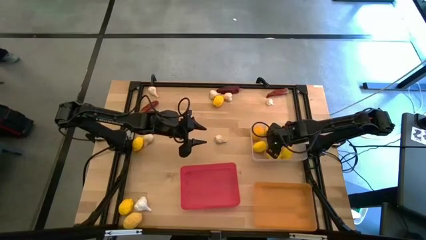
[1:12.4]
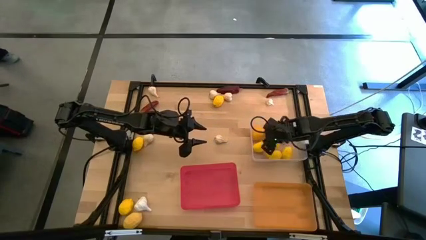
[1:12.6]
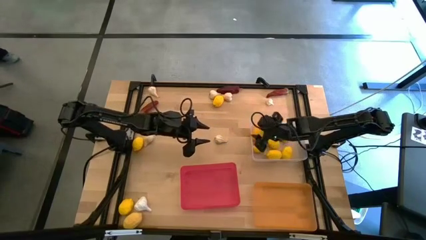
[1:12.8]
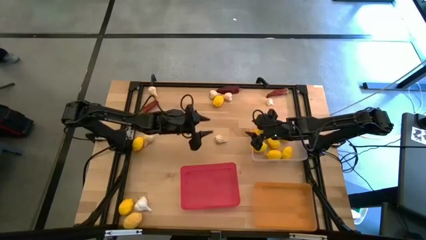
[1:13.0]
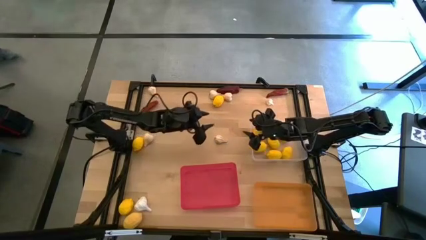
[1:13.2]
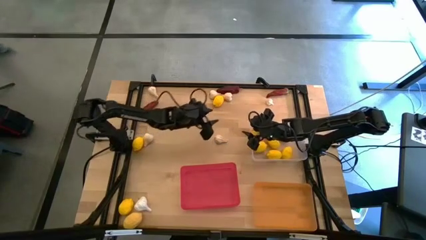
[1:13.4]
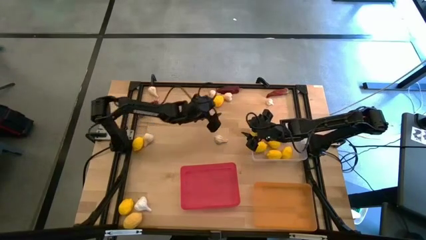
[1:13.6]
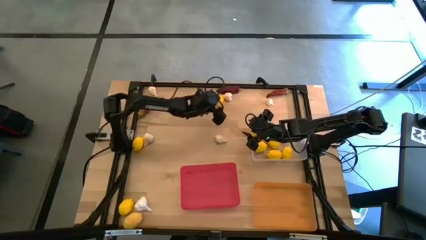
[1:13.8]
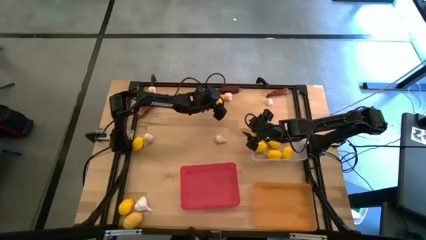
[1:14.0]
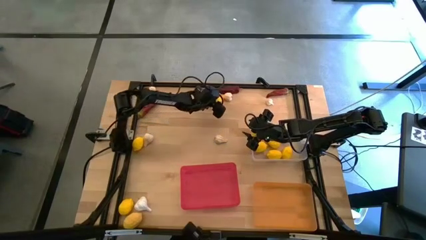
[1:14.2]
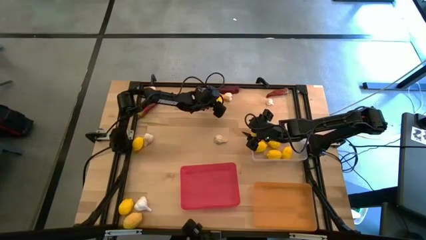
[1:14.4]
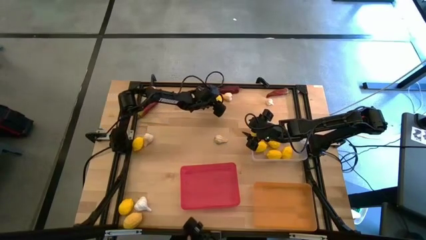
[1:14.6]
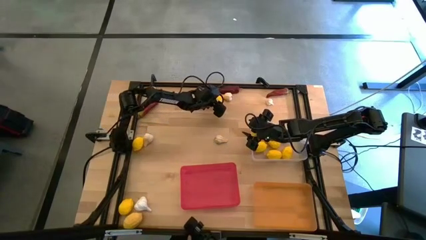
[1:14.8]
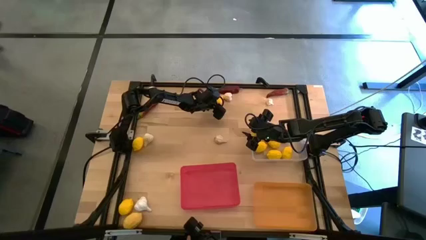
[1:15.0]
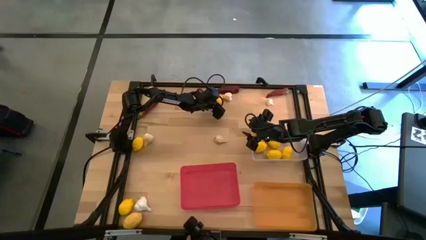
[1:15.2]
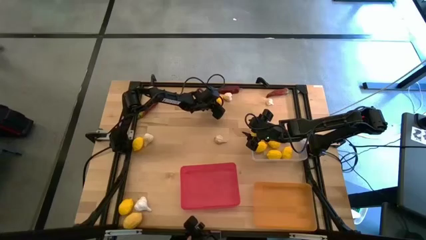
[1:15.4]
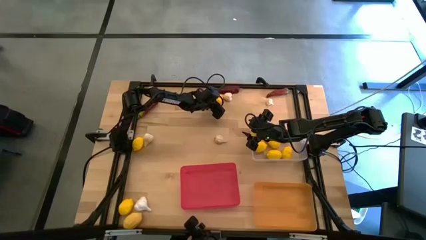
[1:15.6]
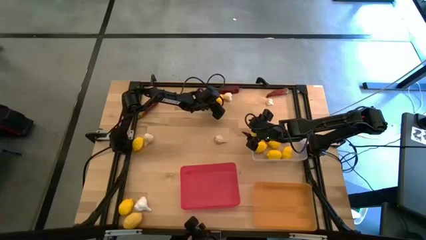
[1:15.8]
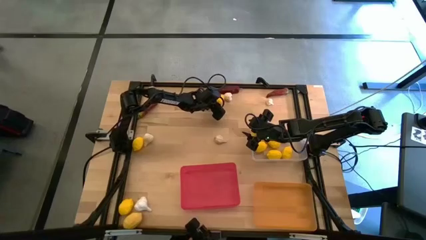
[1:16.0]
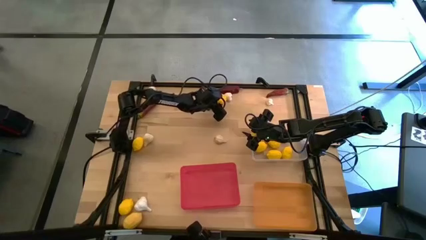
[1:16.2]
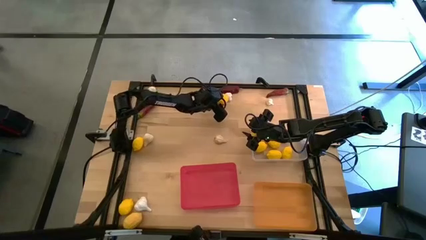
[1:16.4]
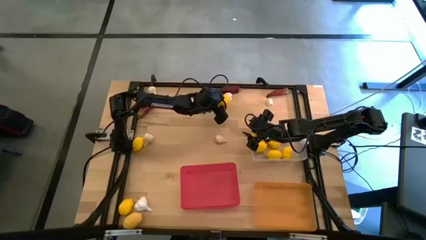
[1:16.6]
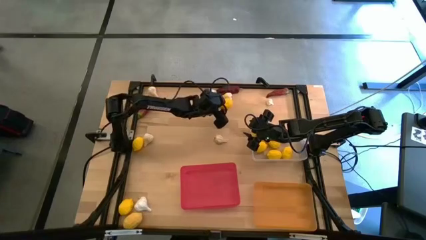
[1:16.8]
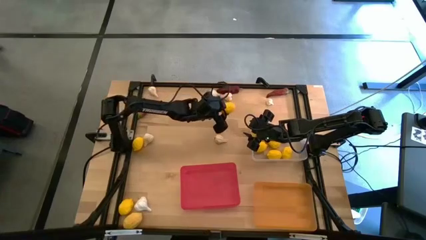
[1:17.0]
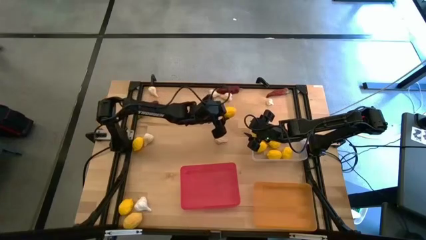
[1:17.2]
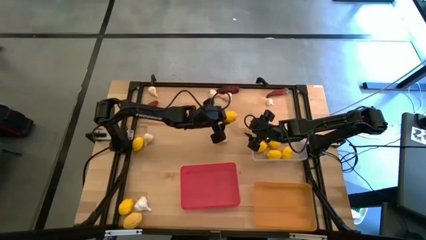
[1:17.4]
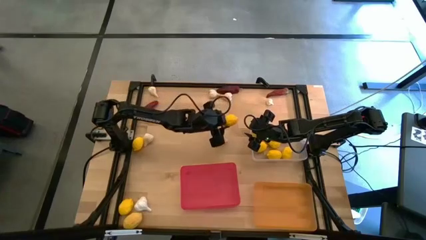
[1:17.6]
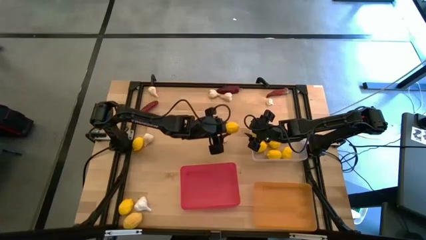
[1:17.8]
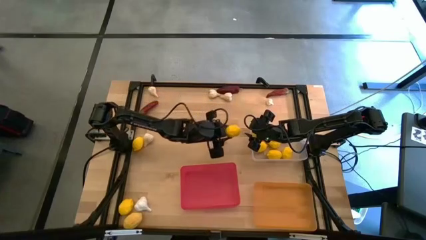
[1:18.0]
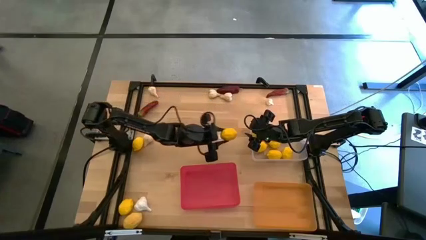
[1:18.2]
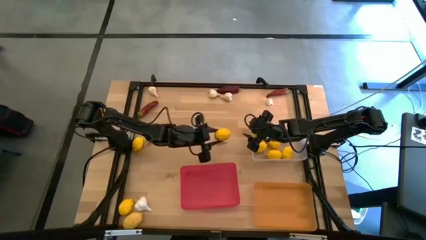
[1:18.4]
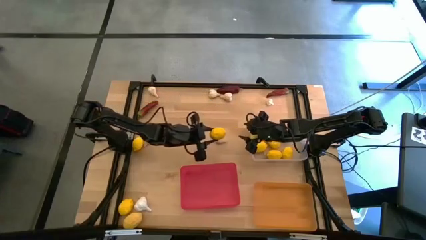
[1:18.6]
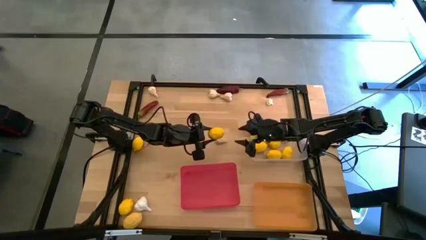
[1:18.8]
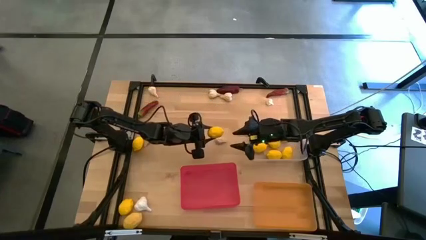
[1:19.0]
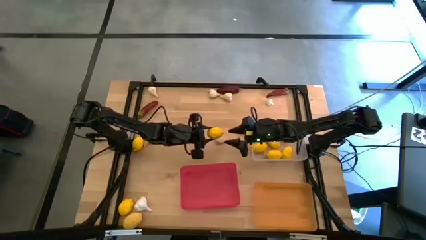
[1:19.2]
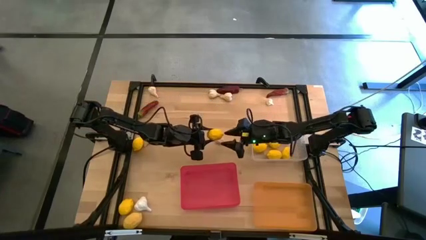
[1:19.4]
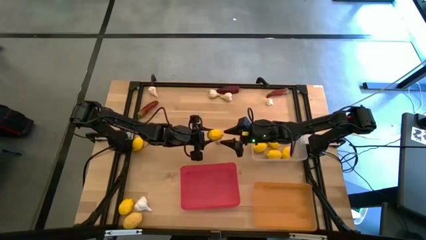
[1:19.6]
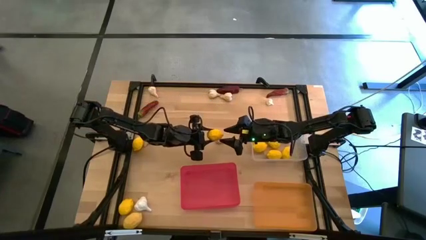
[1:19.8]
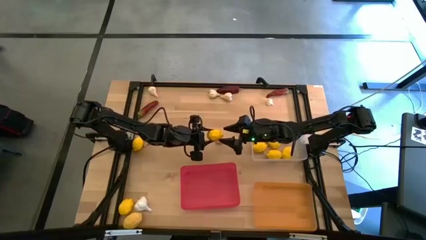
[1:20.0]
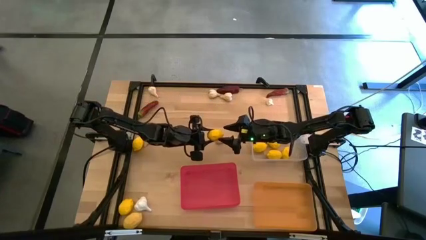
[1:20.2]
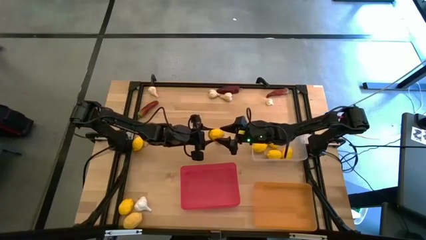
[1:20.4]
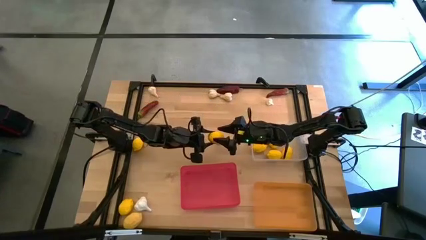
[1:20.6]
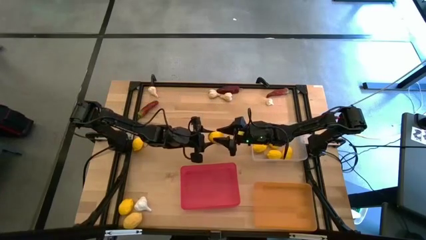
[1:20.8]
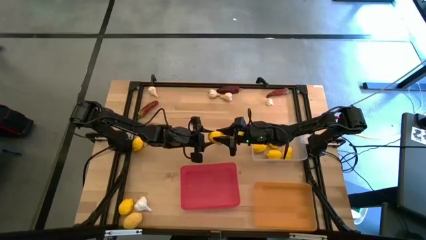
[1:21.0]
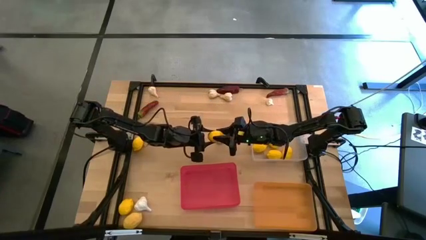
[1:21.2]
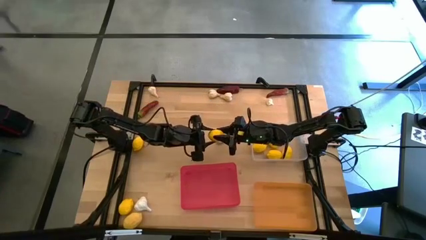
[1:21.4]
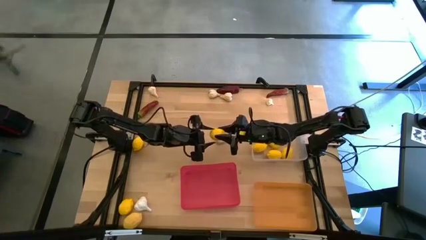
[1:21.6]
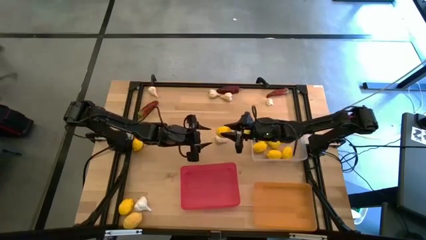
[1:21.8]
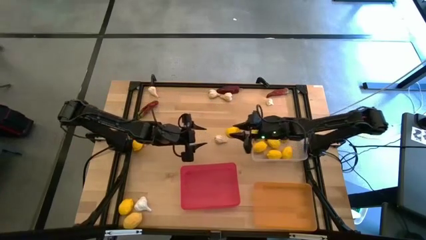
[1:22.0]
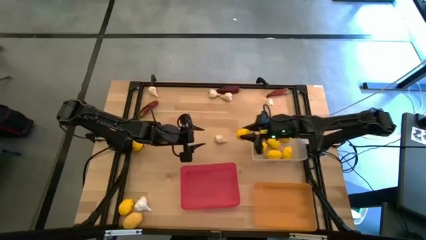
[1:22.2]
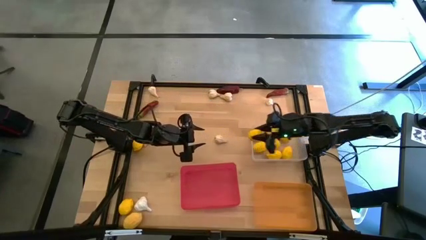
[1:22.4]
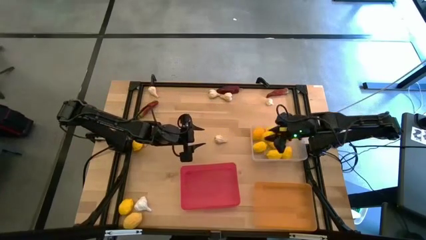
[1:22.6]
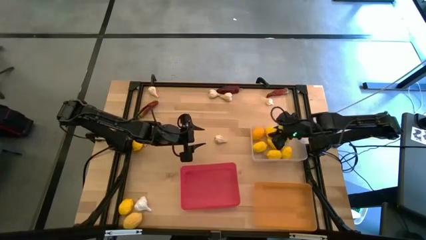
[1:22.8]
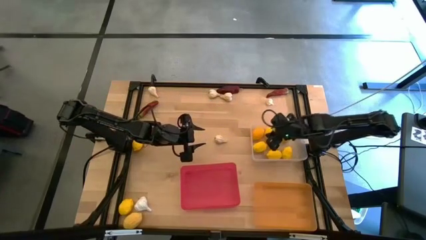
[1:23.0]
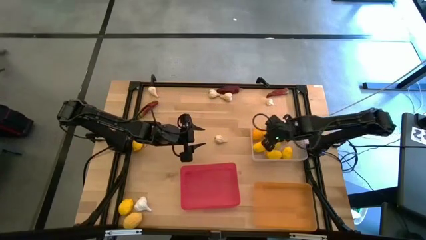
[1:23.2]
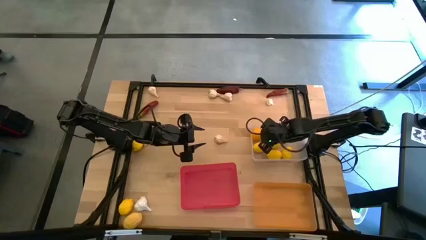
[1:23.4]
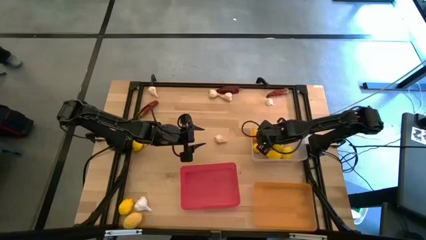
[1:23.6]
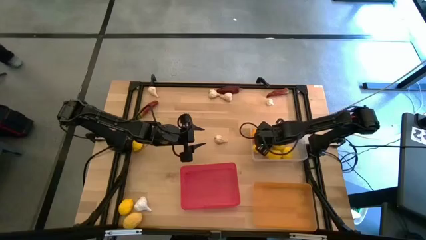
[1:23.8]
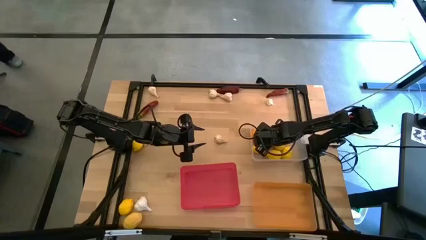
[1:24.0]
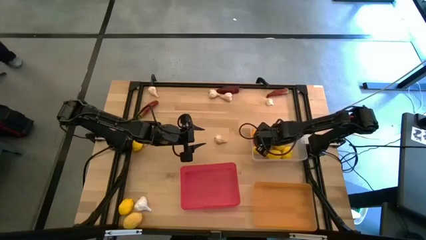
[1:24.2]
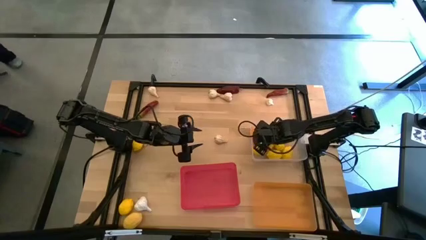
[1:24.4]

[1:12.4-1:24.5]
Task: Sort produce into baskets
Put the yellow lemon into the transparent bin

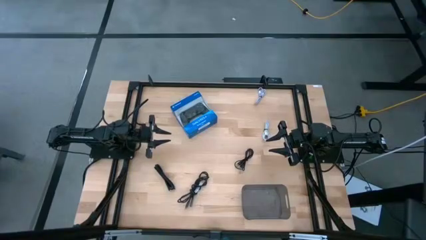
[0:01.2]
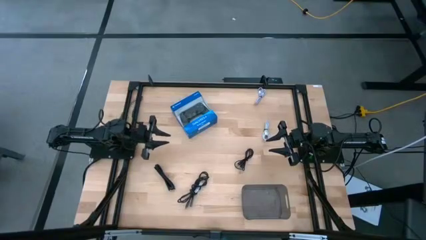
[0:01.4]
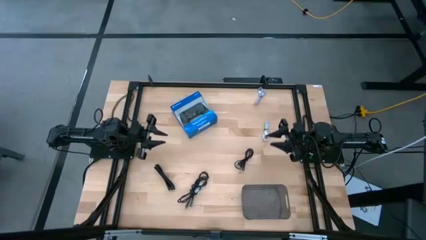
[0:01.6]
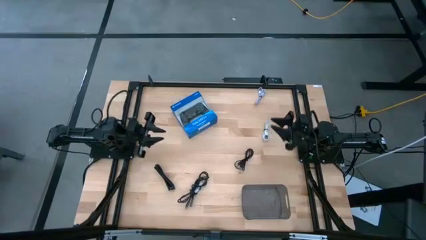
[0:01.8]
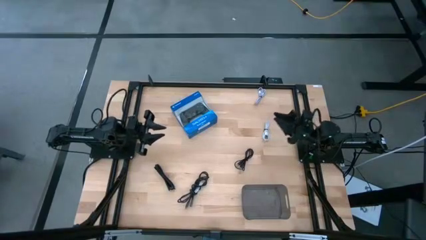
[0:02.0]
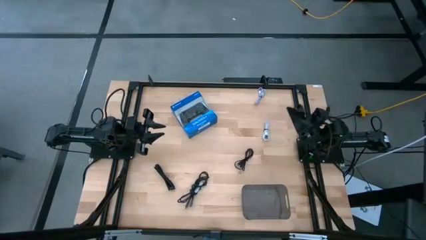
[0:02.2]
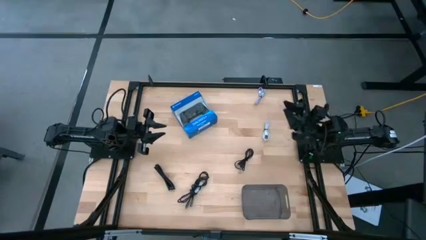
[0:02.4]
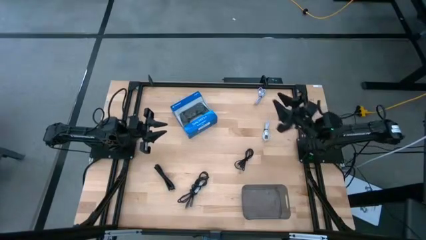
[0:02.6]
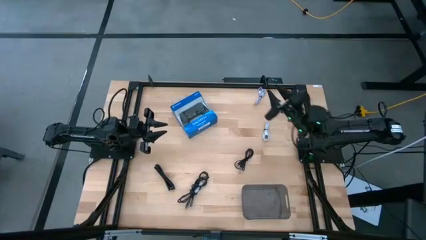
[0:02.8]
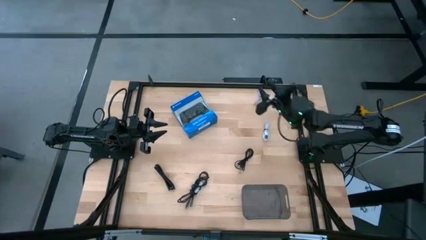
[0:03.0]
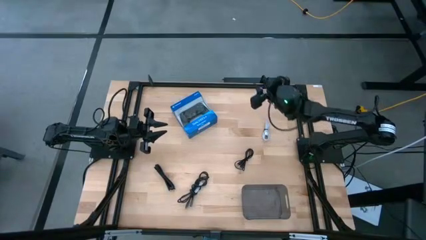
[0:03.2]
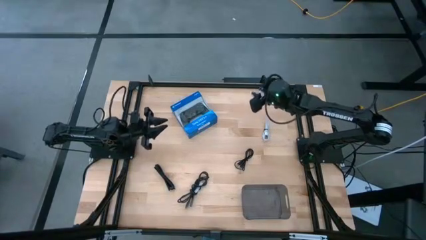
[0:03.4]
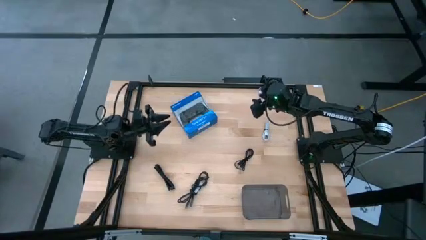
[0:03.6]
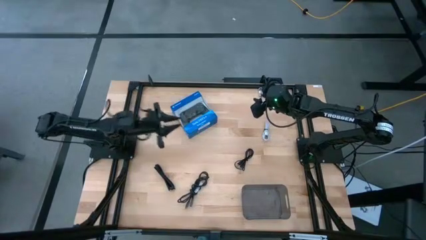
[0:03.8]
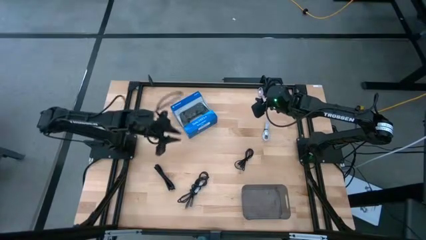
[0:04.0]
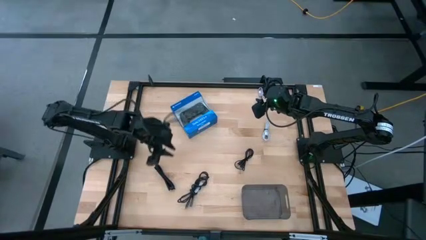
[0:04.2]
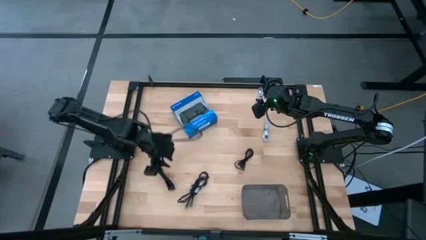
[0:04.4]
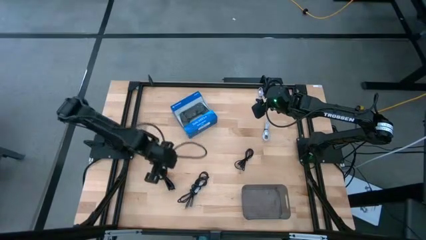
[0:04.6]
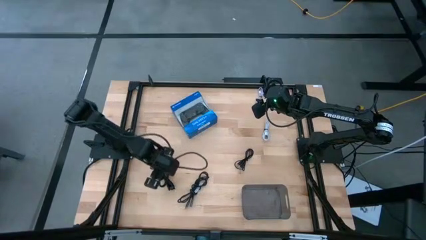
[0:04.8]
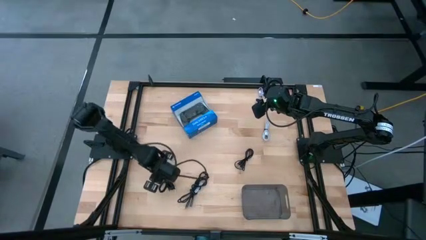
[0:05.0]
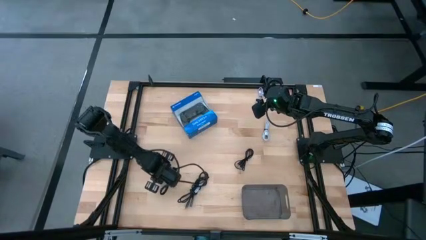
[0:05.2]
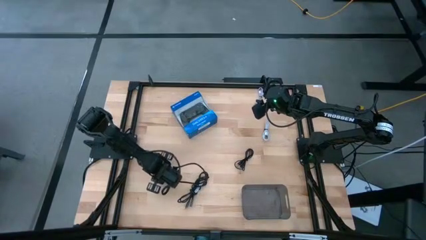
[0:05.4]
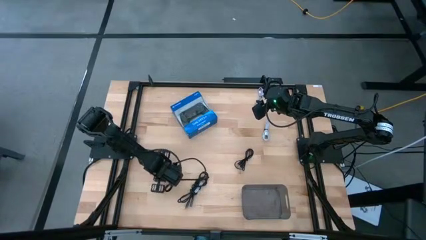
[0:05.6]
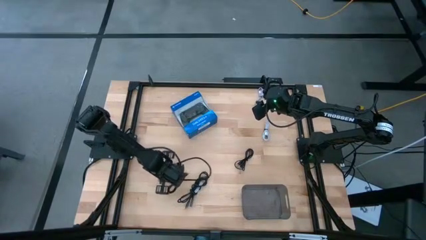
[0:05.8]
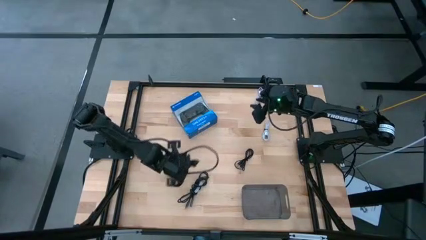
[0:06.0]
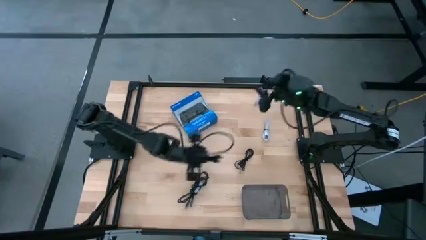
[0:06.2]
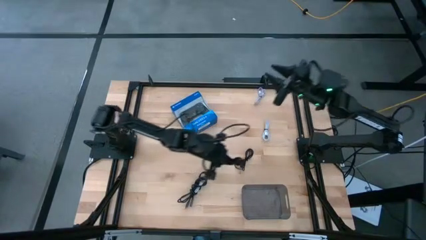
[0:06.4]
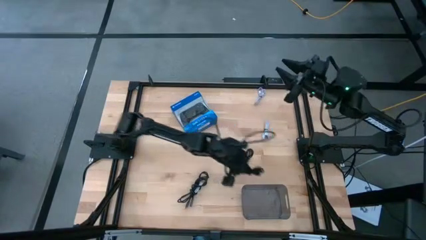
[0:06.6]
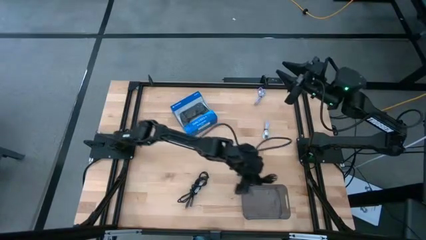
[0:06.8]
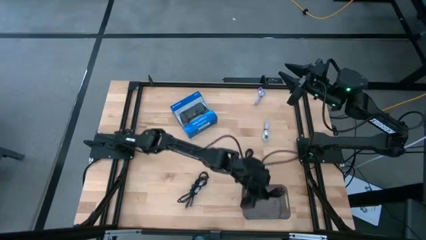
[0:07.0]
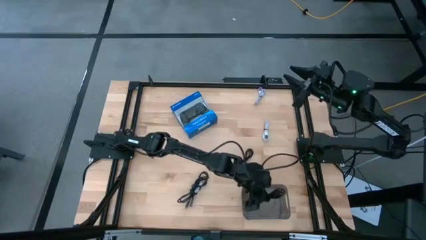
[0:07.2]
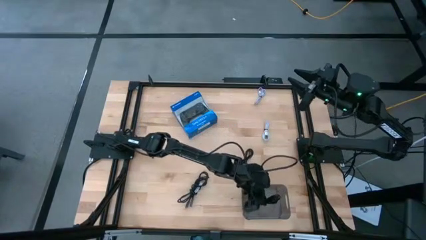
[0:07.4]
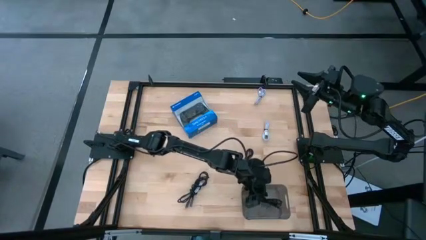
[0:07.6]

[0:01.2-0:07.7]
Task: Pick and place USB-C Cables
Put the left black usb cable into the grey transparent bin
